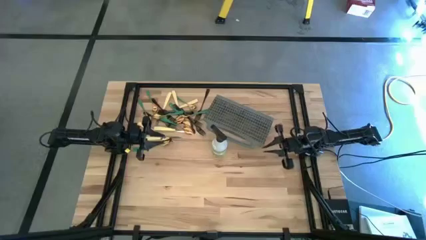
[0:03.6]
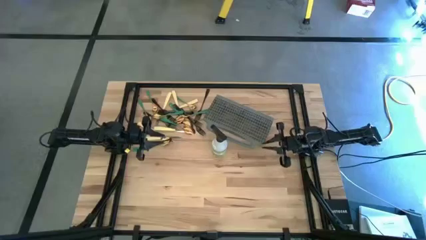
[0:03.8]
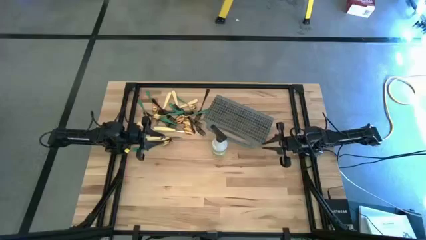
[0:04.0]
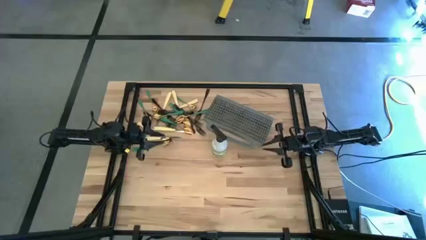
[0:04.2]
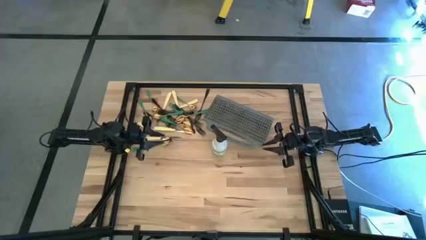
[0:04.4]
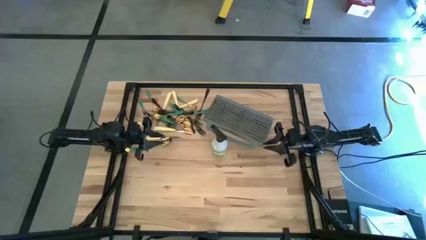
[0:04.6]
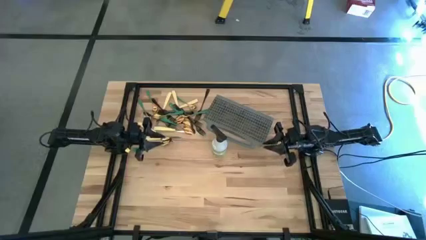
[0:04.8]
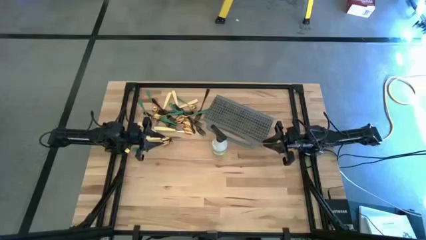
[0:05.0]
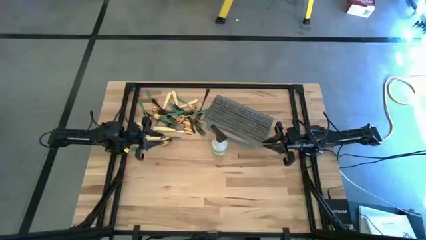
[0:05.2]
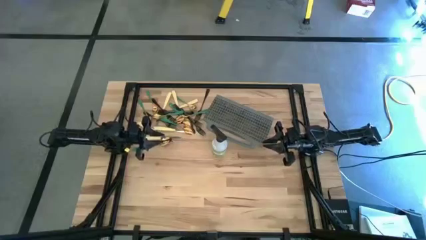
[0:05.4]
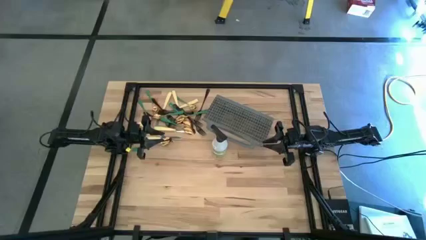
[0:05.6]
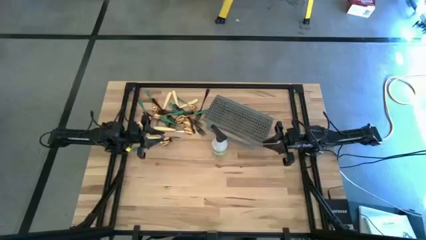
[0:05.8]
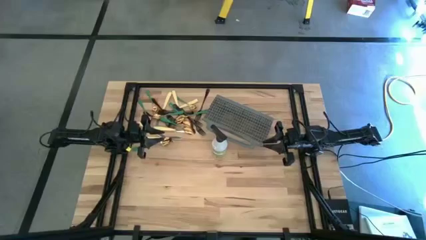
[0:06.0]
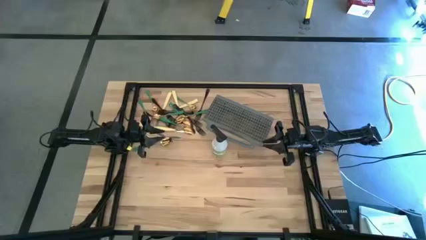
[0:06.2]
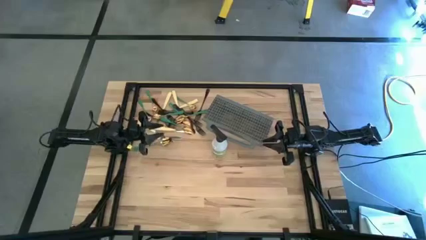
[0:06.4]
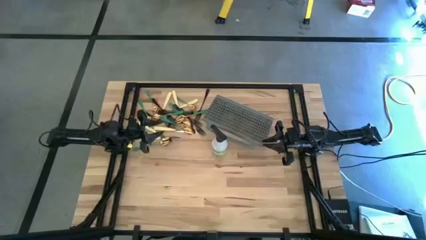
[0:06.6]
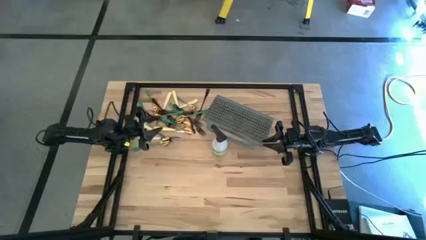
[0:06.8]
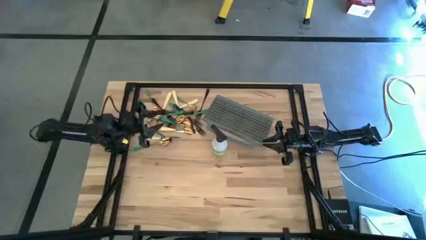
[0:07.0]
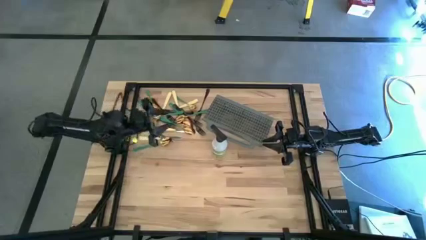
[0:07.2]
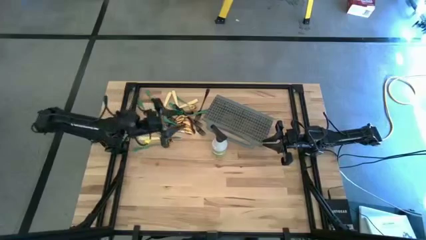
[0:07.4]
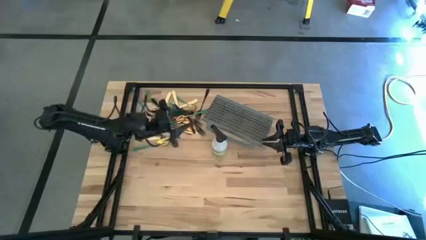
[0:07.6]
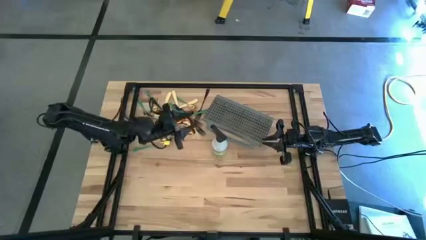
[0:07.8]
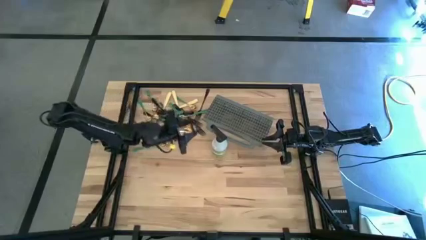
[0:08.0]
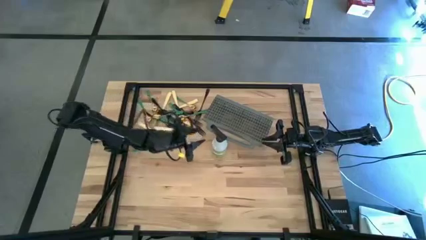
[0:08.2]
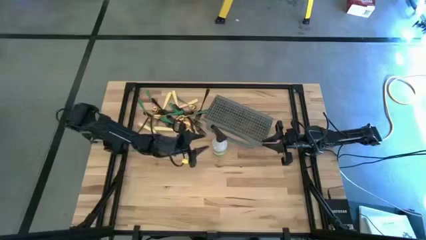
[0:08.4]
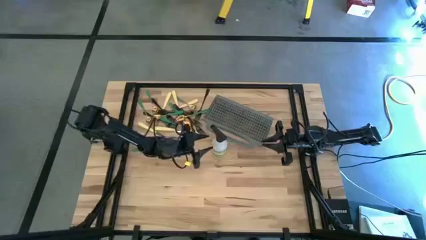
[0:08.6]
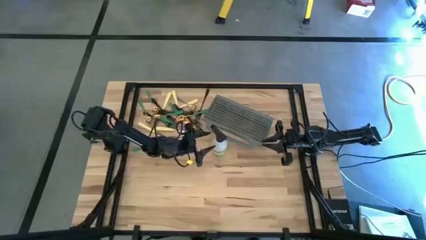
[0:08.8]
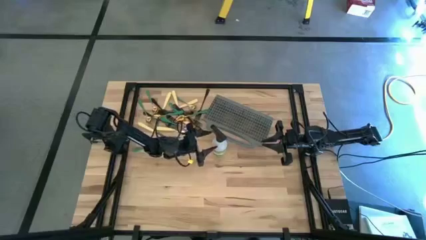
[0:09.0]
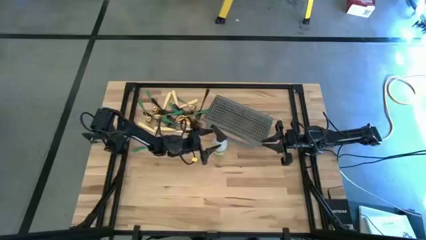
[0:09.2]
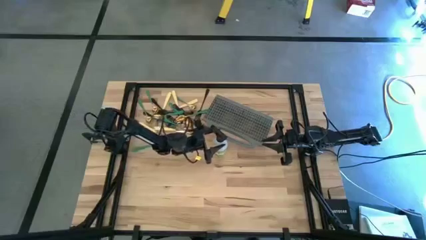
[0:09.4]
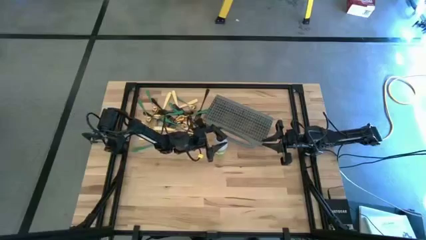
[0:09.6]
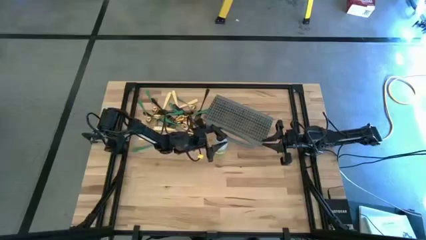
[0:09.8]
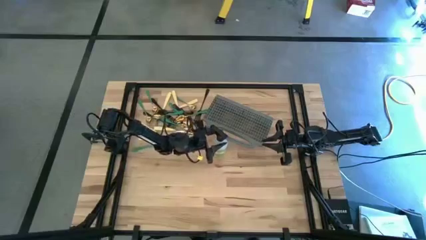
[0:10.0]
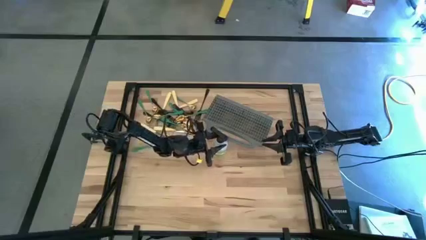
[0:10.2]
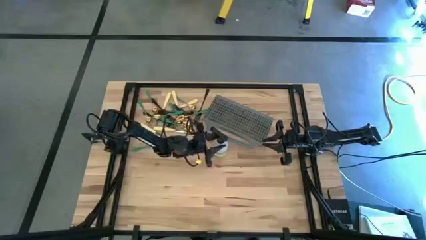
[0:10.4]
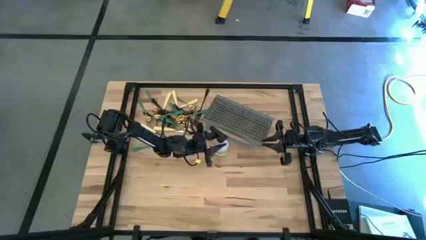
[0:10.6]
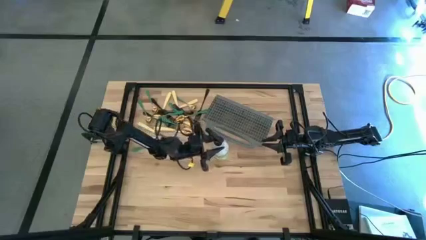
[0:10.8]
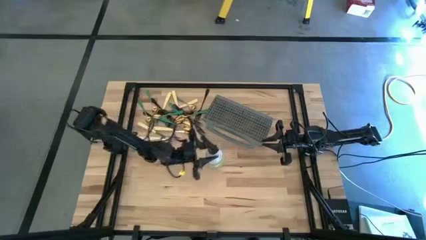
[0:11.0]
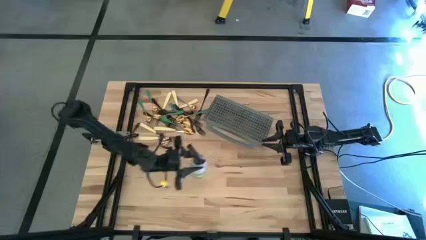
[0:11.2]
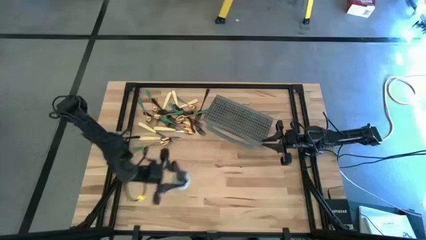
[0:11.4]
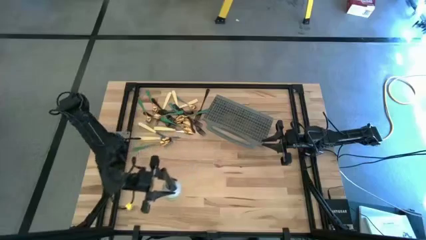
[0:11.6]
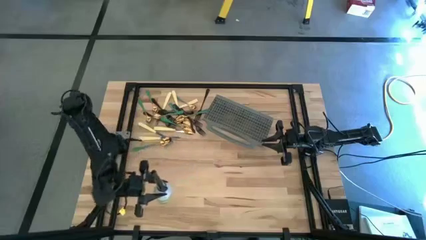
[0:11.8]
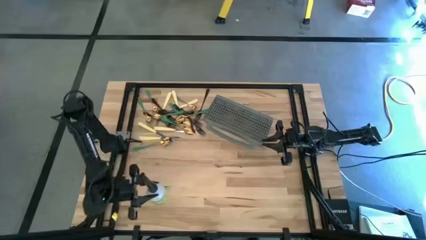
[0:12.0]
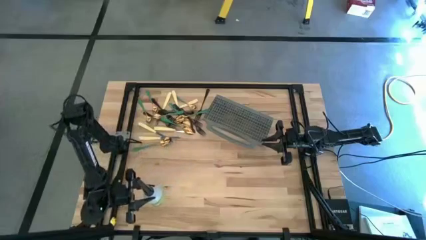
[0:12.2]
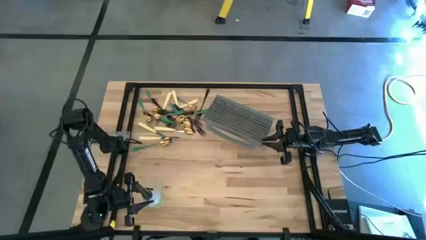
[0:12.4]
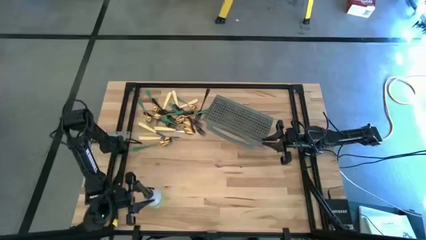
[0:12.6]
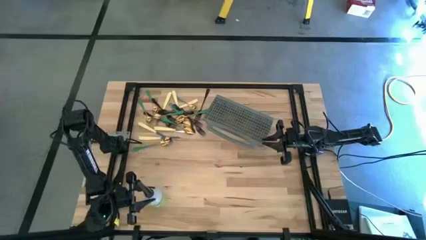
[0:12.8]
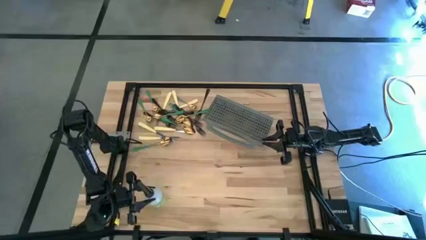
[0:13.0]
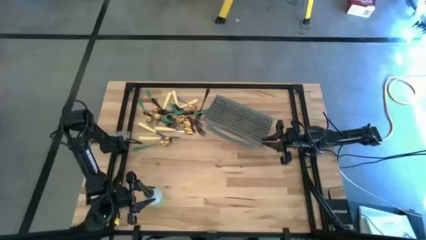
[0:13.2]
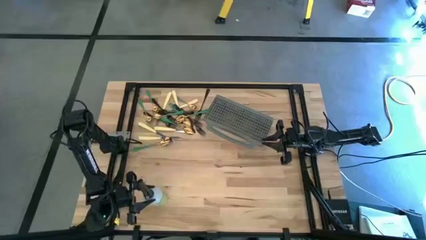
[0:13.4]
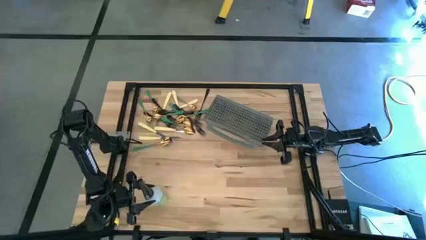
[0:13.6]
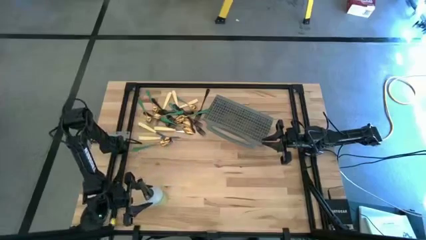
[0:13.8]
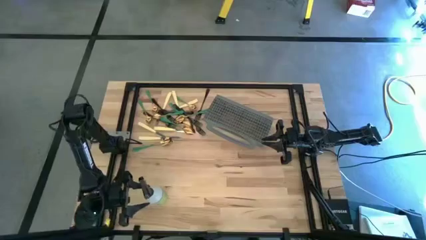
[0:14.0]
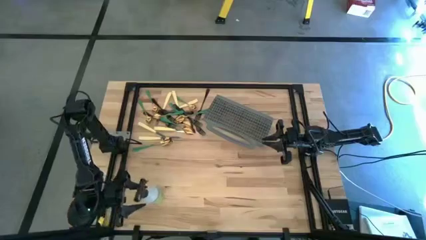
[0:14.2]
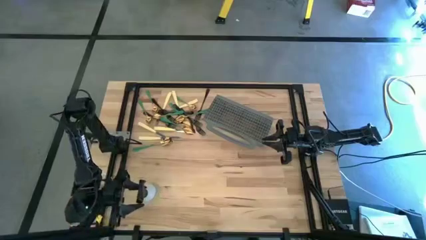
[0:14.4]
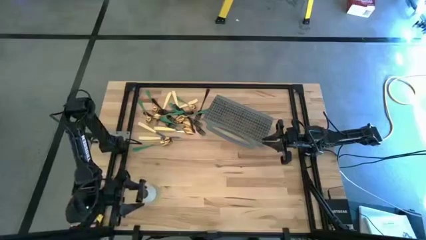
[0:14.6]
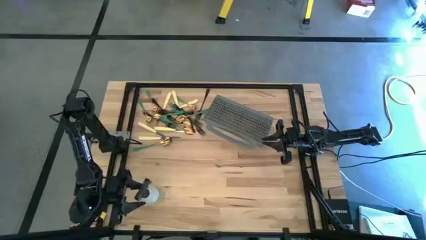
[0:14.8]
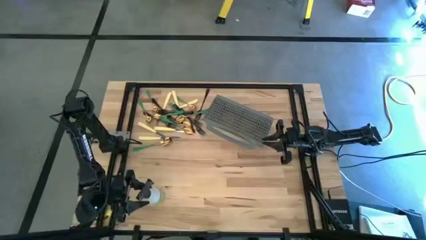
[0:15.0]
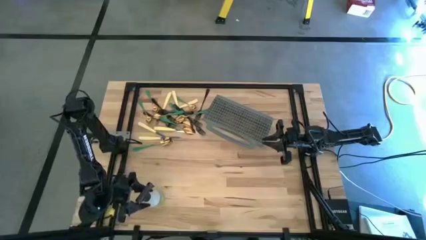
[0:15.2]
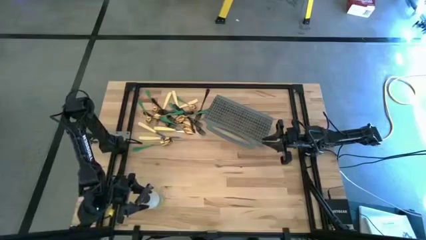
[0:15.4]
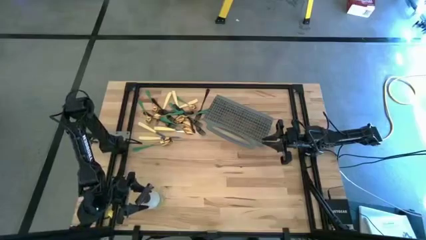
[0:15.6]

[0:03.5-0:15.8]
Task: Sort silverware
Move the white spray to the bottom left of the table
